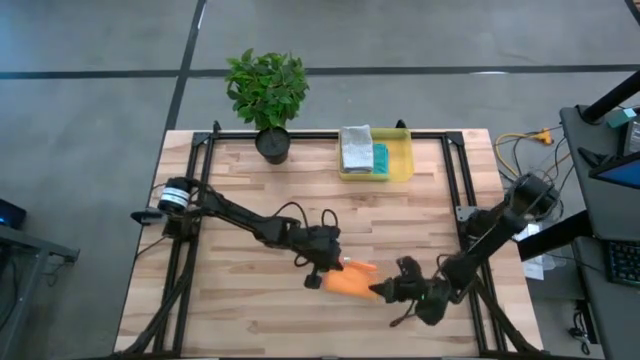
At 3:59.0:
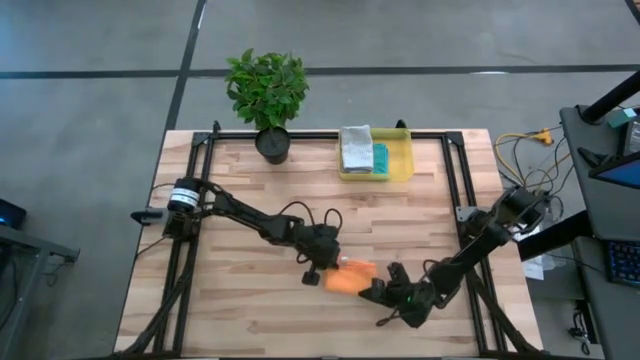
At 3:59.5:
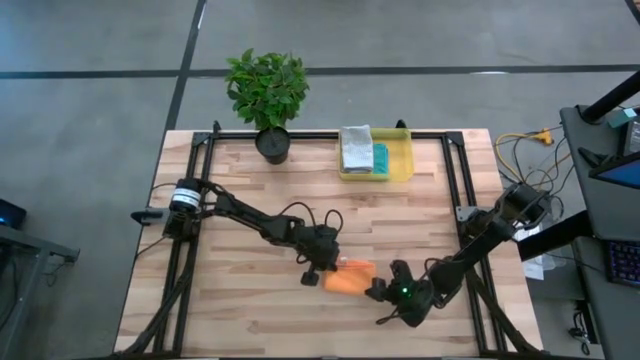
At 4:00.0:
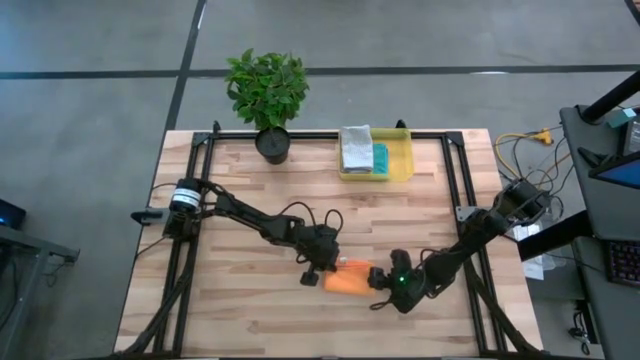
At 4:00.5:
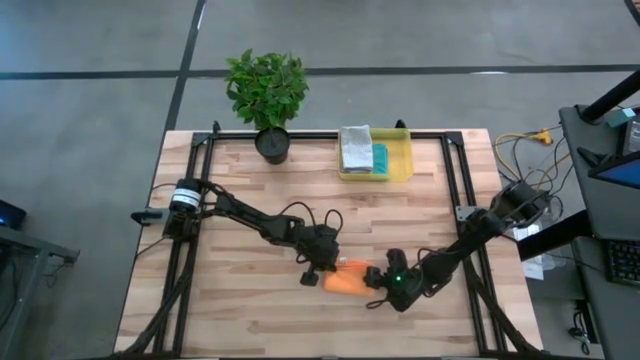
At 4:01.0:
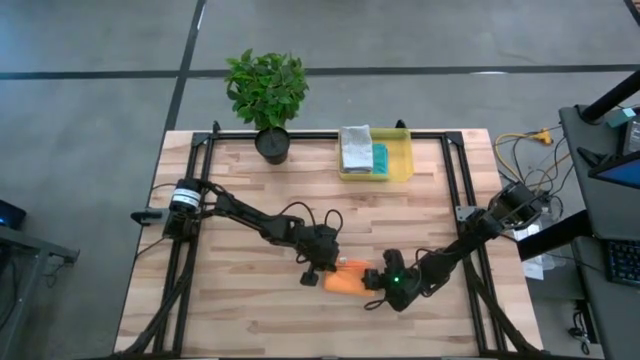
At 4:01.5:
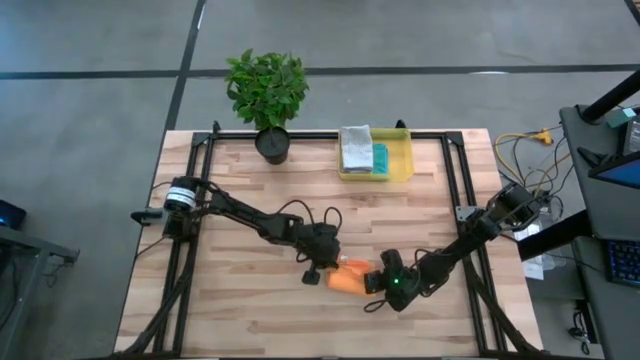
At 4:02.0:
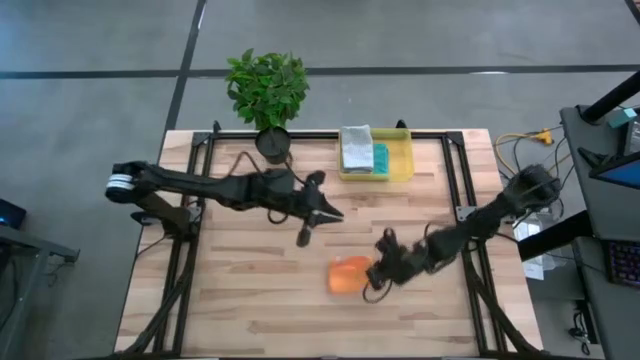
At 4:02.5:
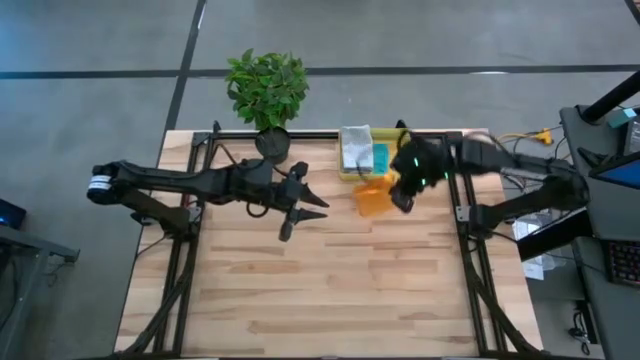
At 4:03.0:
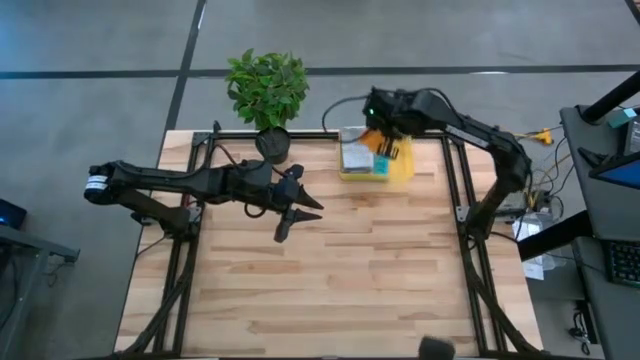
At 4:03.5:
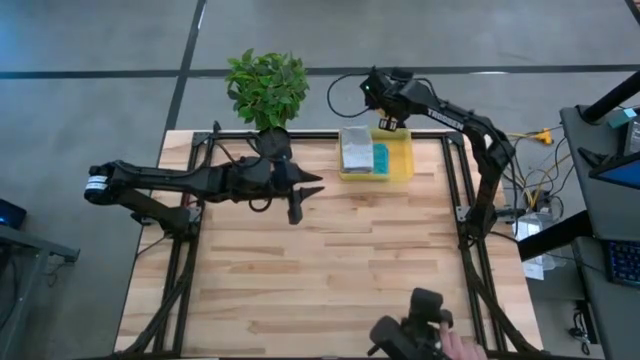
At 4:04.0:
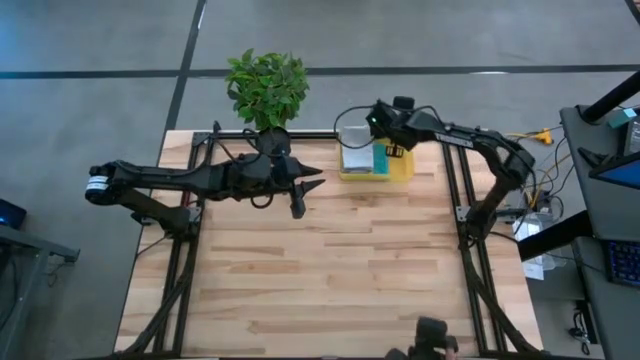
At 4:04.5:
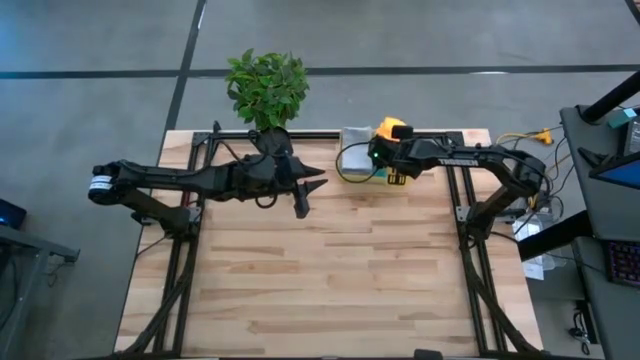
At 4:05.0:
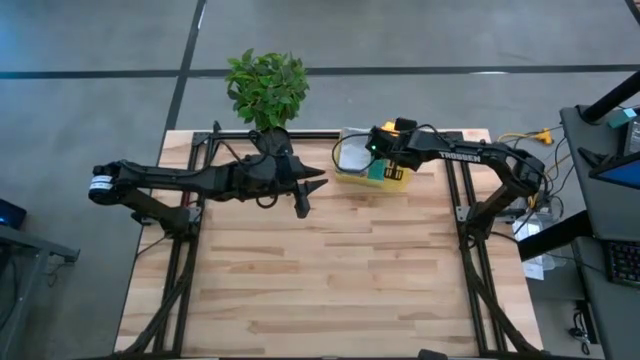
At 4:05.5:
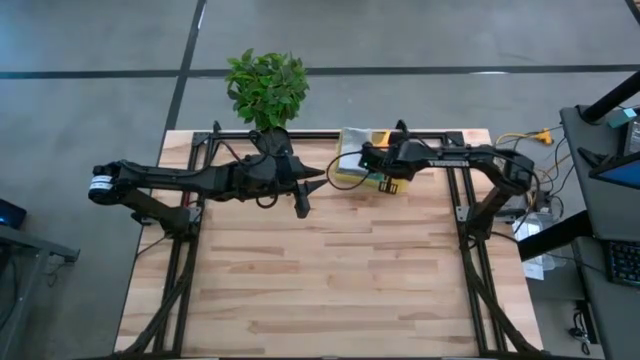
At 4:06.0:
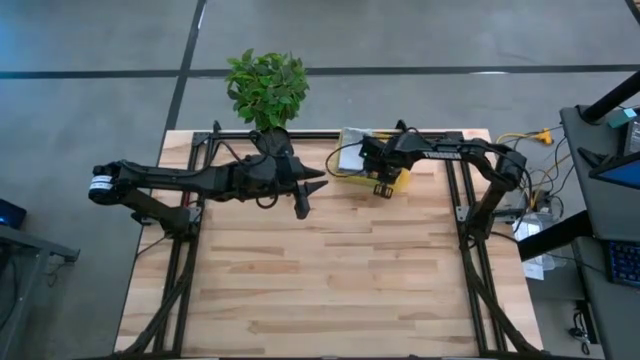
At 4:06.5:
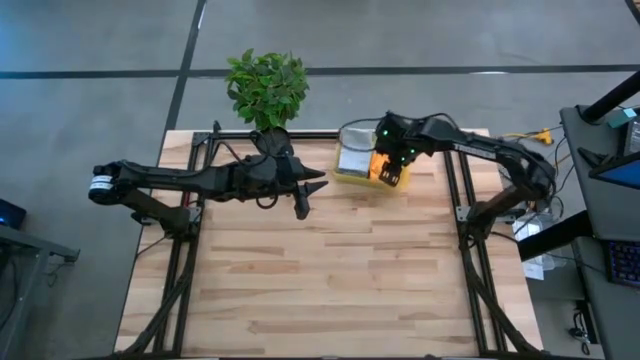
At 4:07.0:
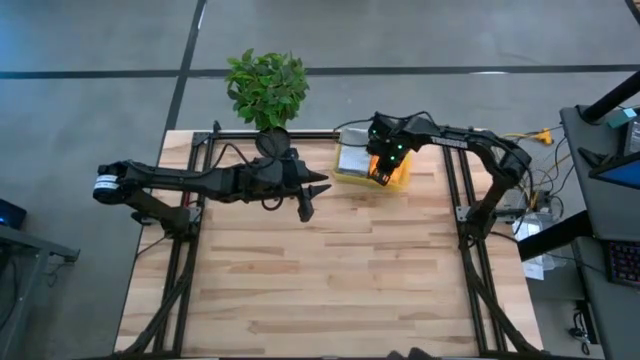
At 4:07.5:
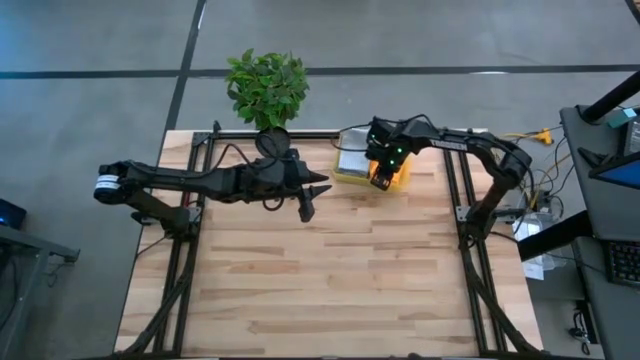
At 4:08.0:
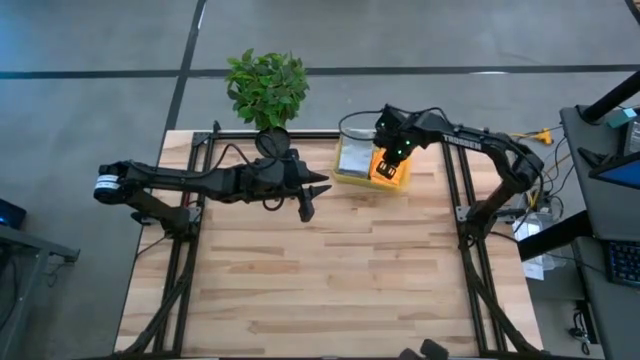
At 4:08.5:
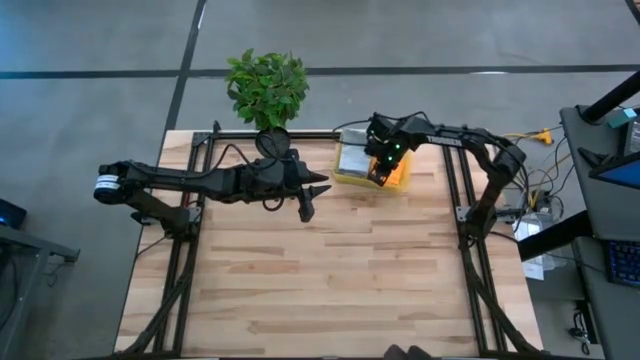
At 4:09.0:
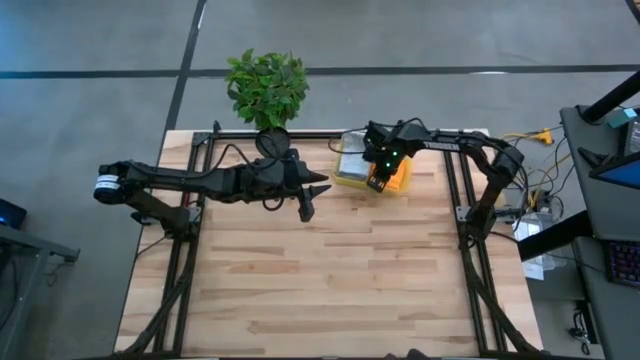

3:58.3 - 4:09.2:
Task: Fold microfiber towels
Put the folded orange microfiber towel into the yellow bin

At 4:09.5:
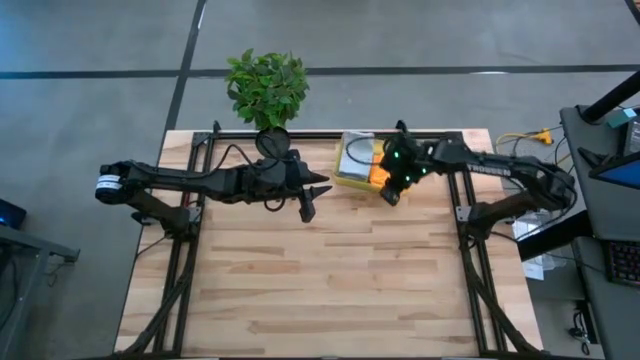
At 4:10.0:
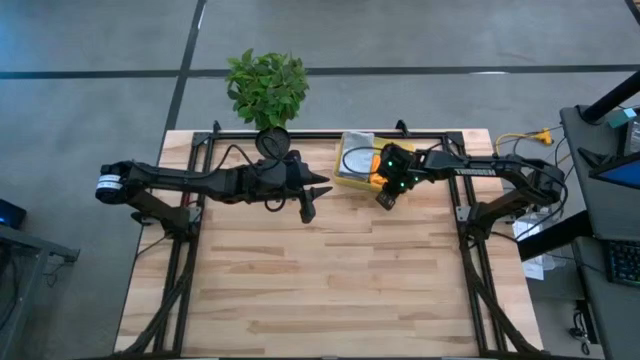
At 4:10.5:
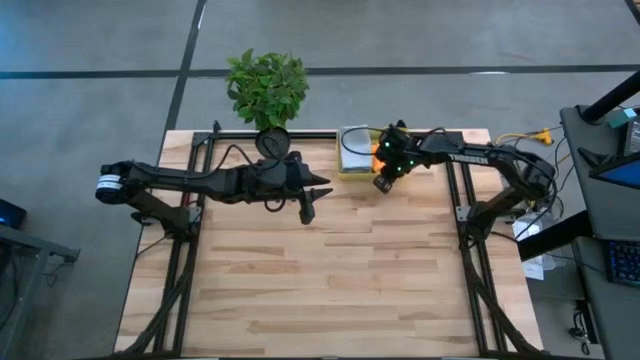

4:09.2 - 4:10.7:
Adjust the yellow bin

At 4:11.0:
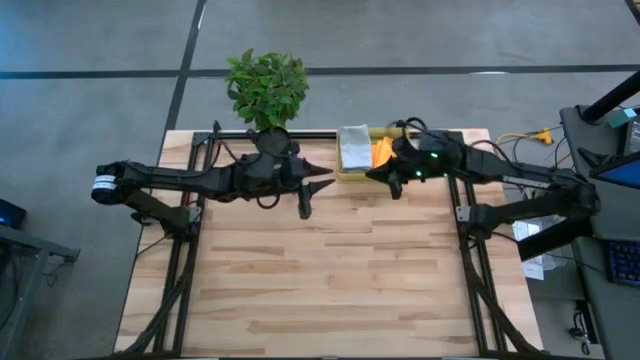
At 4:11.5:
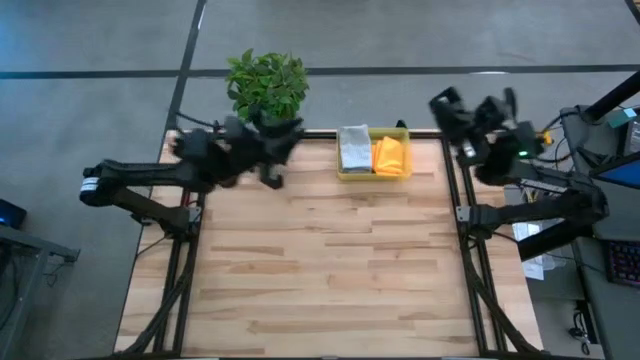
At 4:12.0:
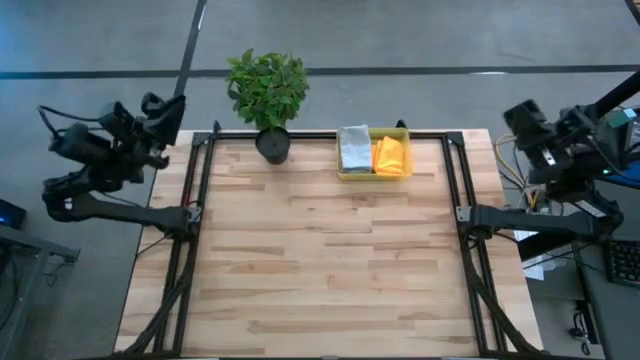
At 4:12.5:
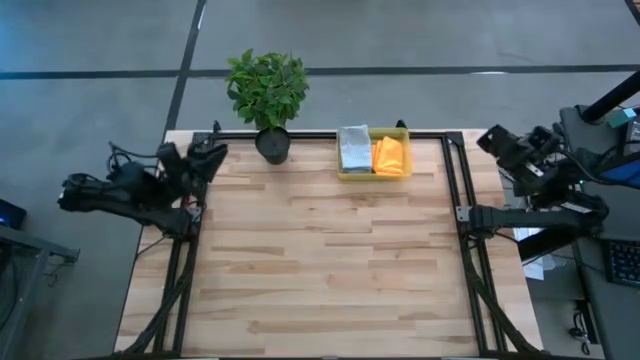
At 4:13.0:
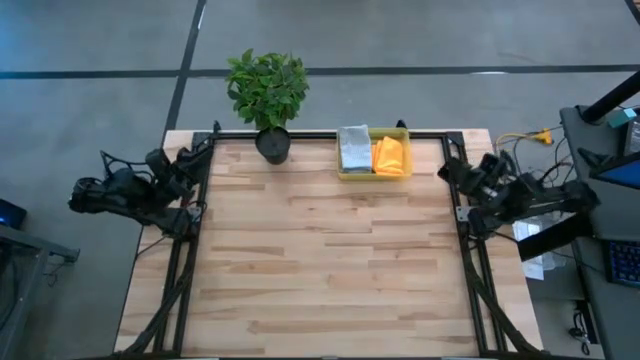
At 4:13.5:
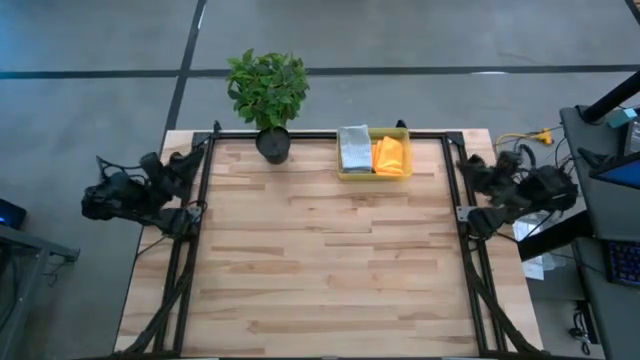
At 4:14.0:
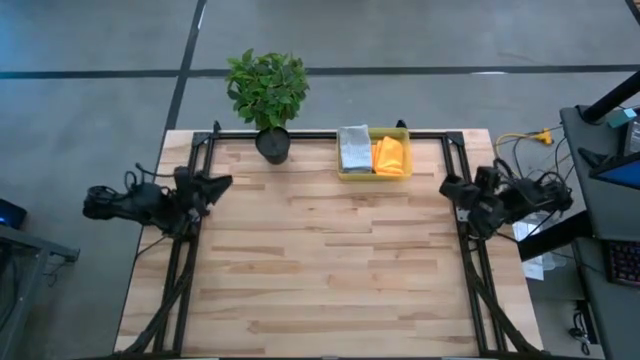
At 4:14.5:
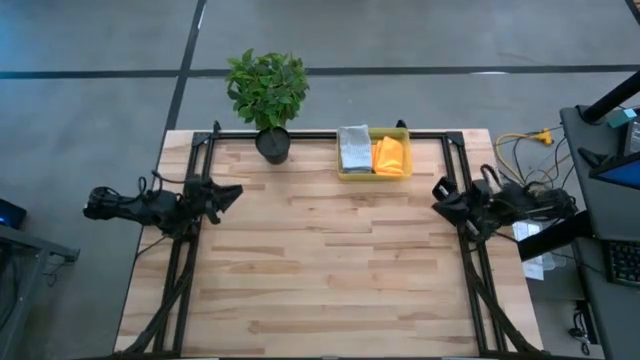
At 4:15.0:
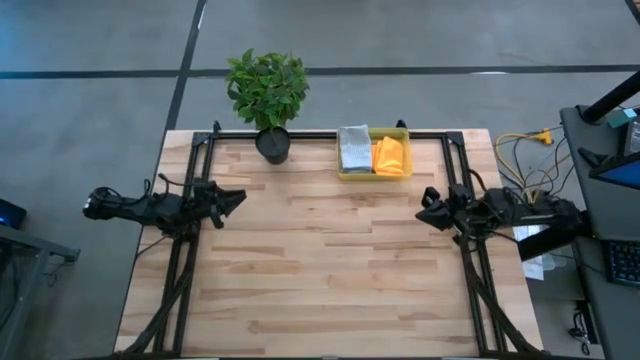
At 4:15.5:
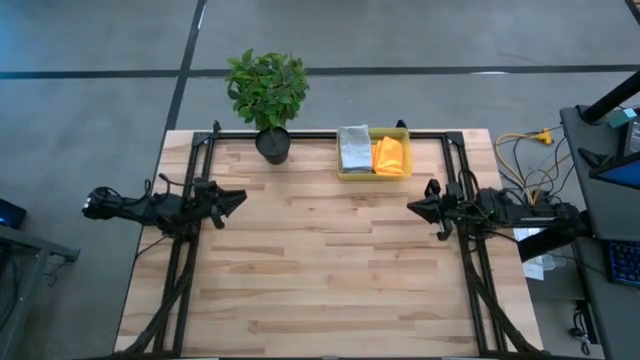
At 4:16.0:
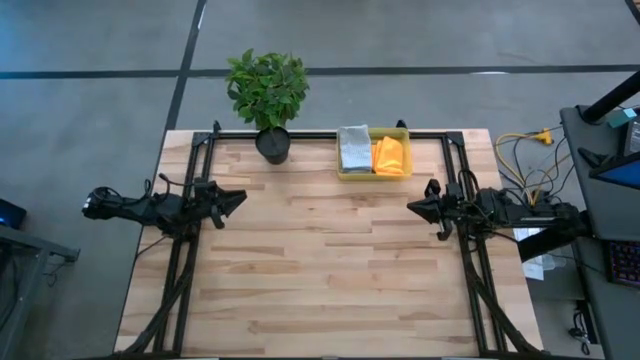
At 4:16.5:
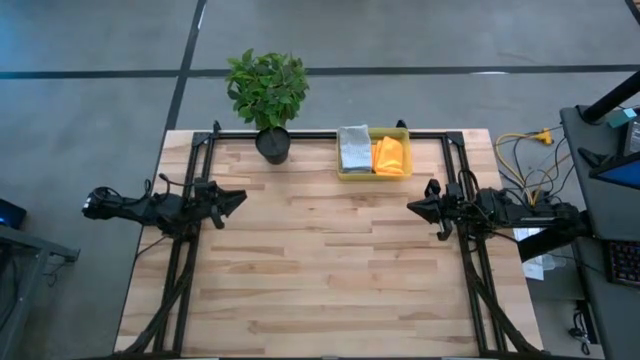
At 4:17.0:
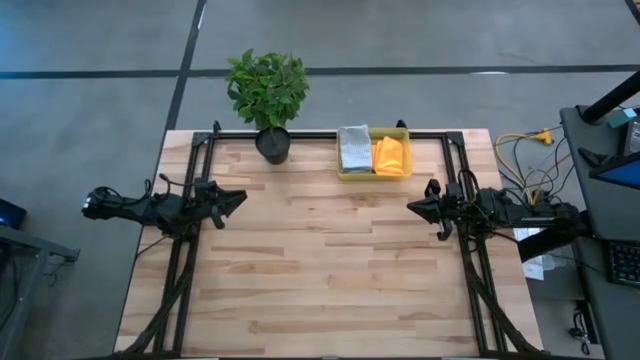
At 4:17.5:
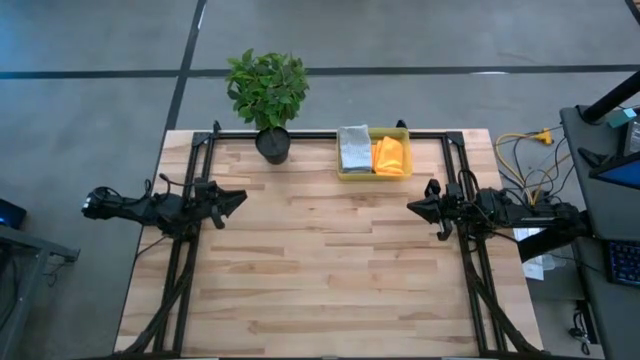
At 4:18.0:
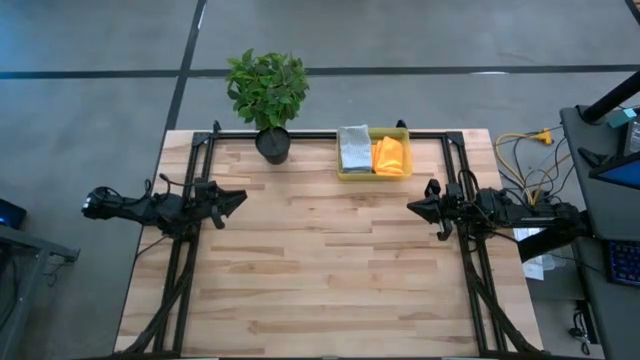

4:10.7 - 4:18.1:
Return to Home Position
